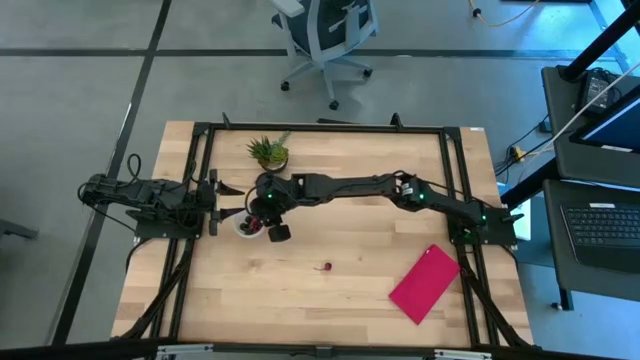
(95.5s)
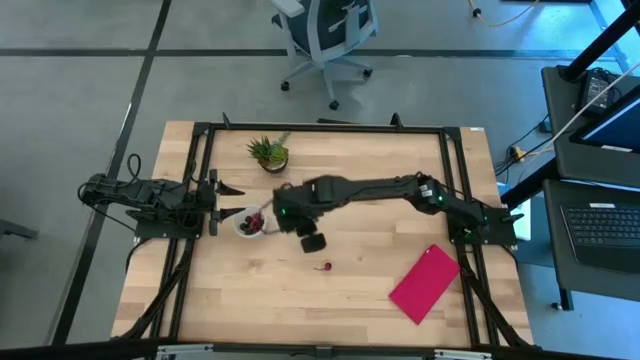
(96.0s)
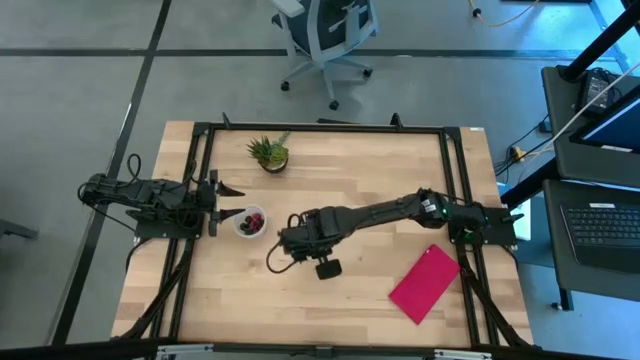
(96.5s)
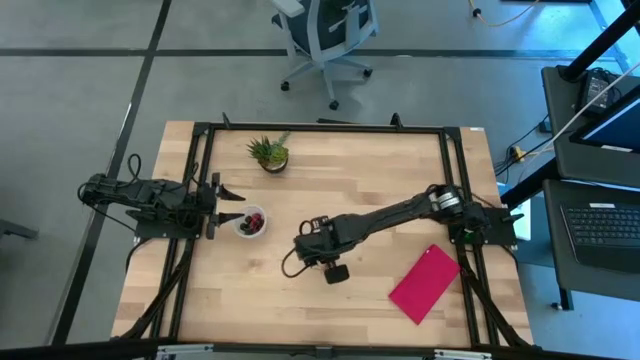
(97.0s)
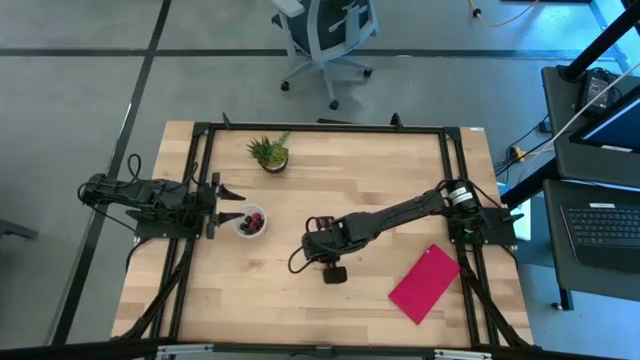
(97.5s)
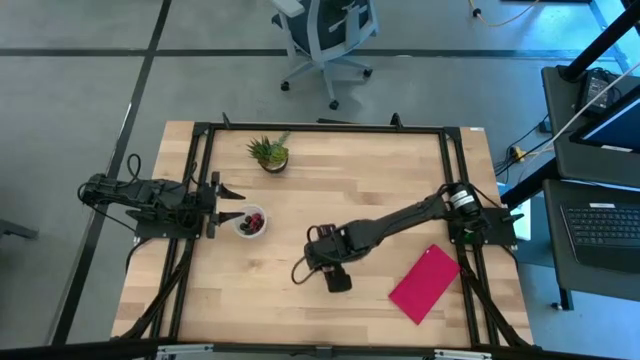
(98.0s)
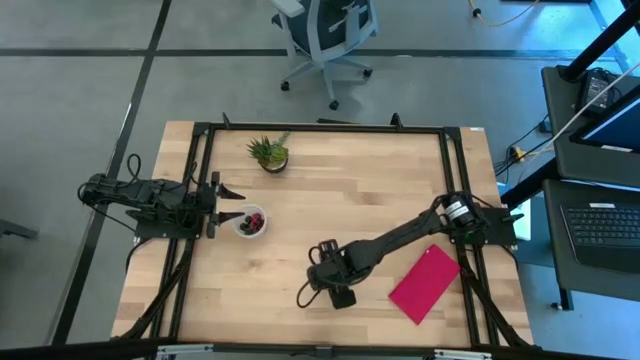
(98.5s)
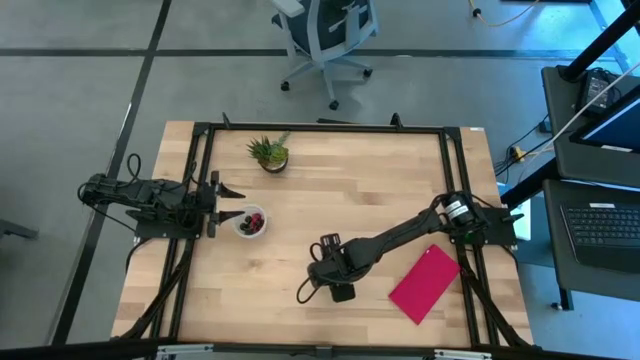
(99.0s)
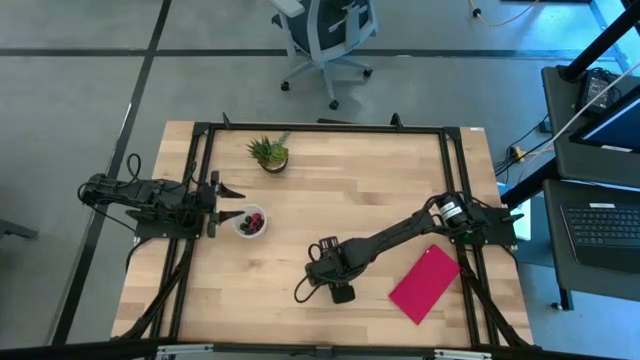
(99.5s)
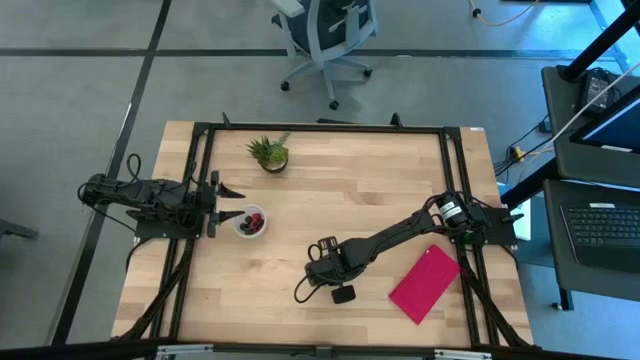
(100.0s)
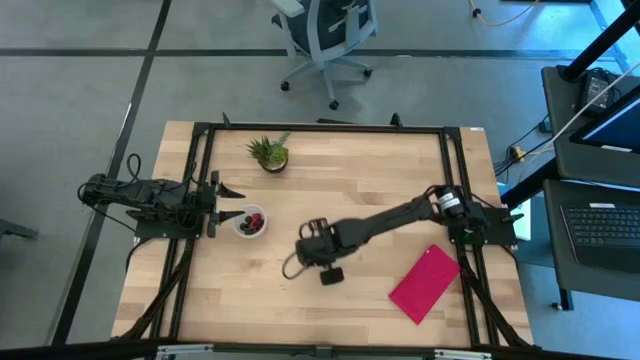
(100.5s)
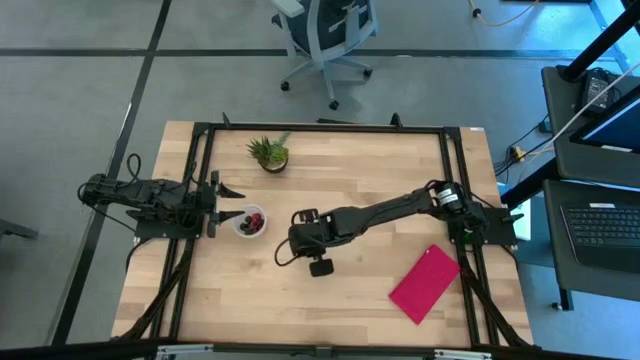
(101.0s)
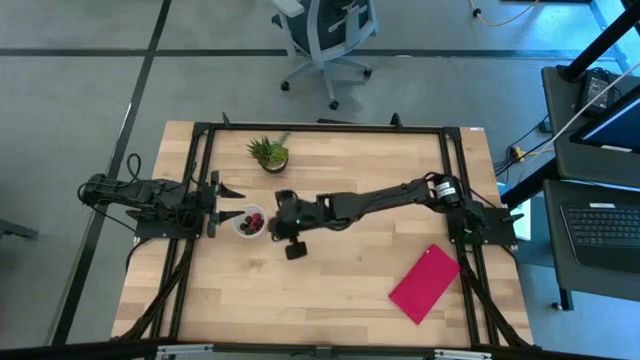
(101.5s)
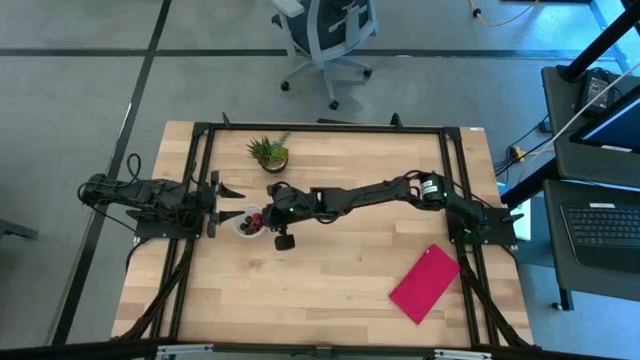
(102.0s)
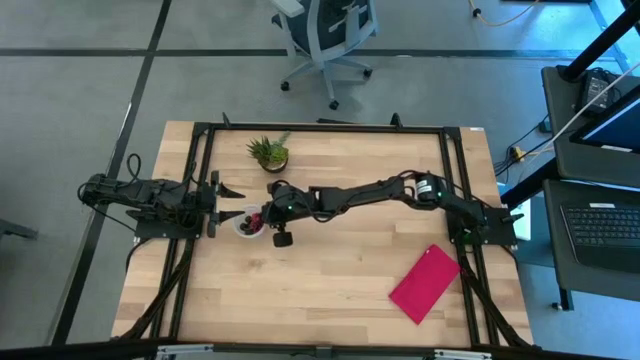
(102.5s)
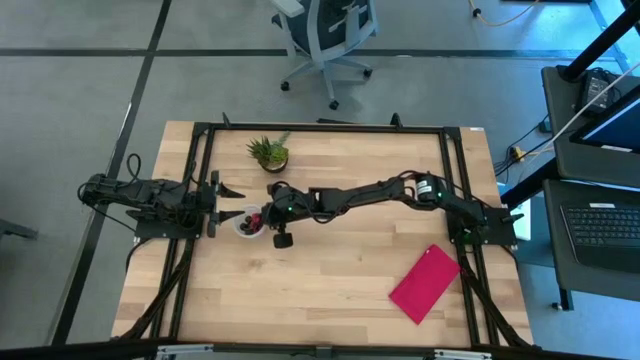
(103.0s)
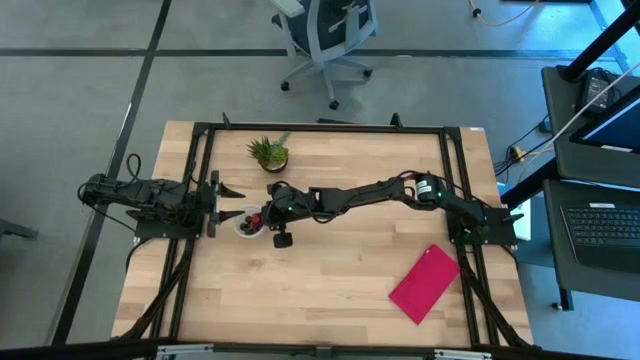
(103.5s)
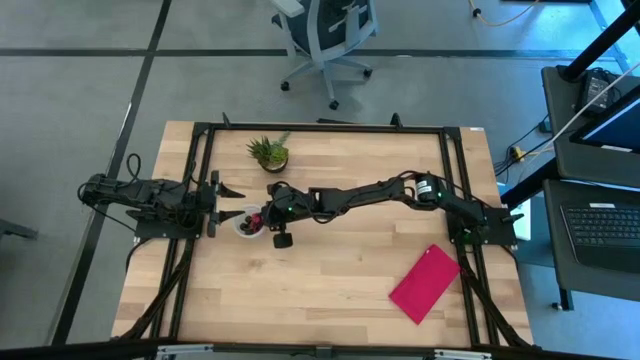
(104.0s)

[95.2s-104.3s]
Task: Pick and placing Produce into tupperware
Put the red cherry into the transparent container

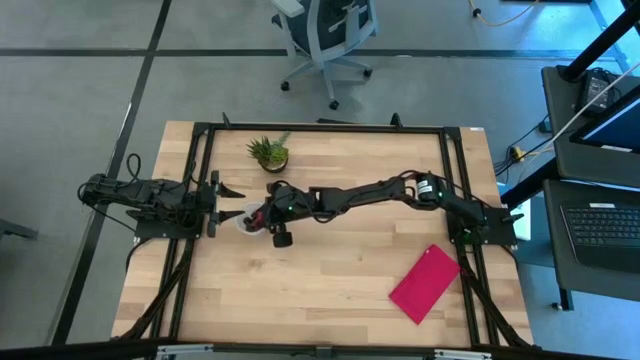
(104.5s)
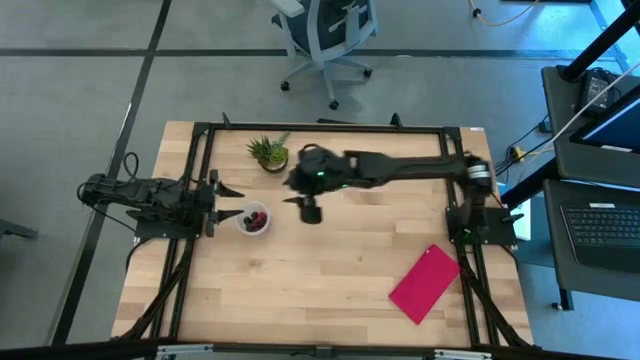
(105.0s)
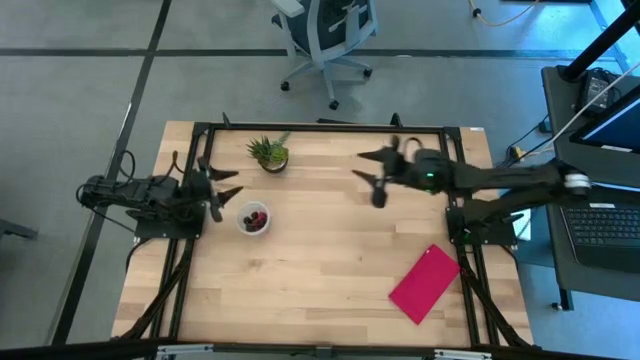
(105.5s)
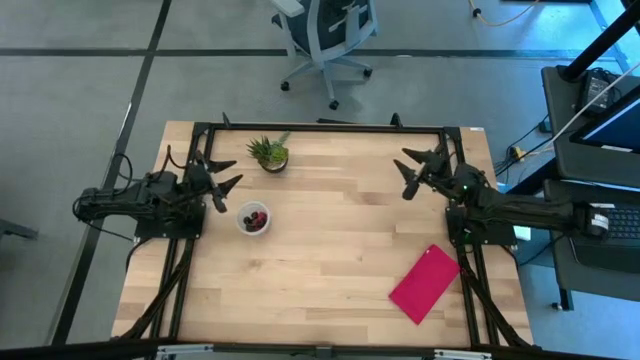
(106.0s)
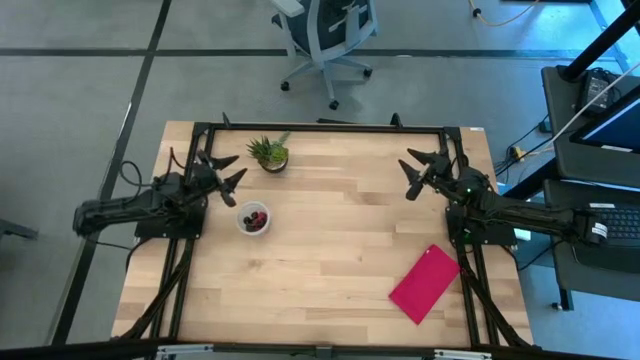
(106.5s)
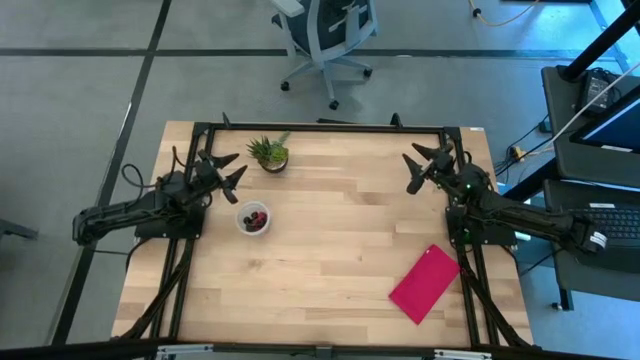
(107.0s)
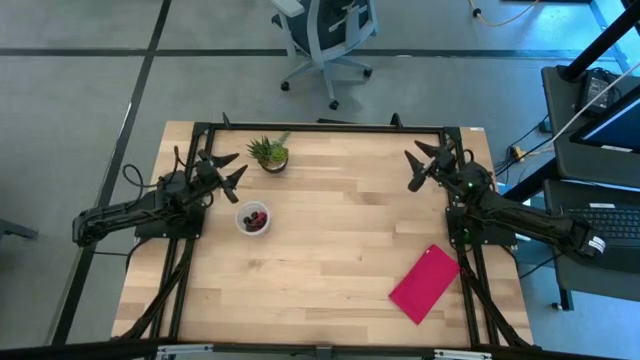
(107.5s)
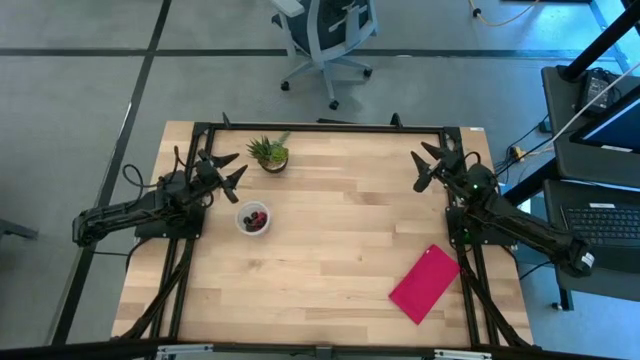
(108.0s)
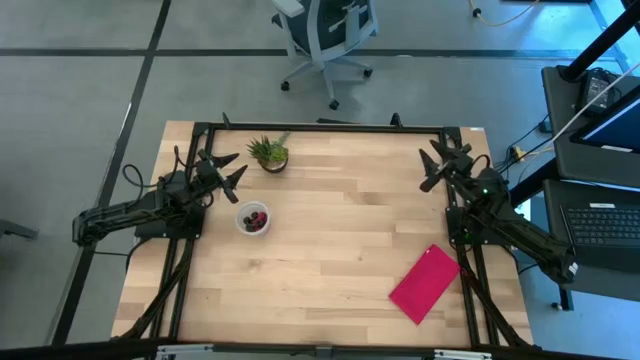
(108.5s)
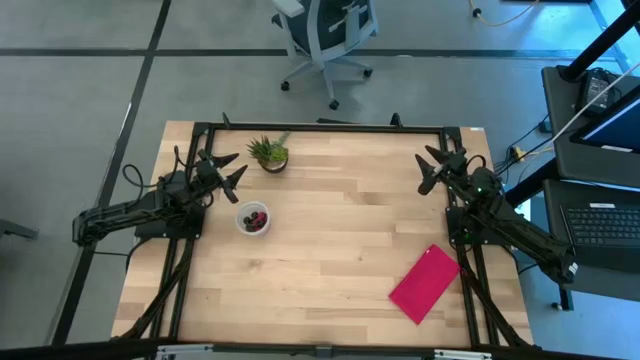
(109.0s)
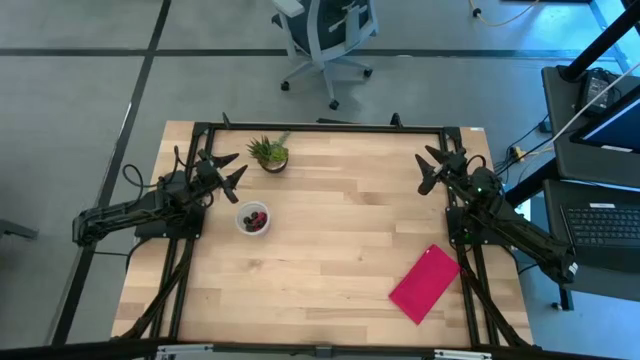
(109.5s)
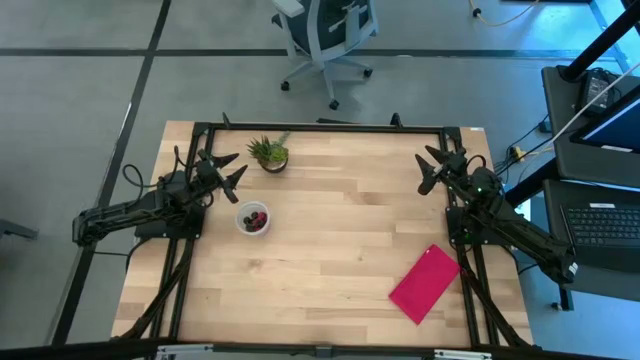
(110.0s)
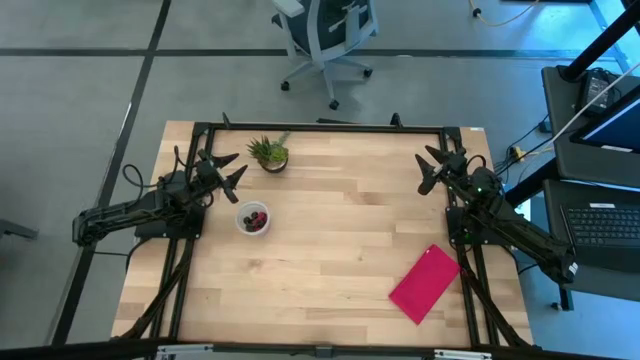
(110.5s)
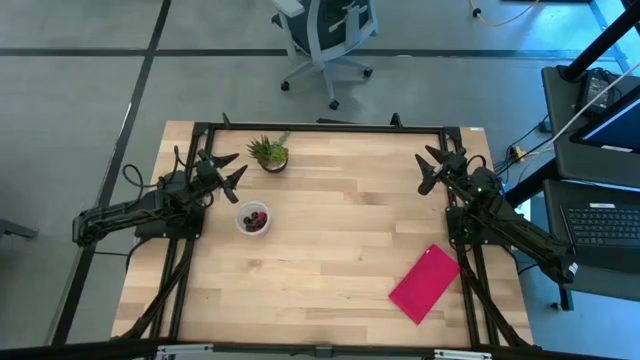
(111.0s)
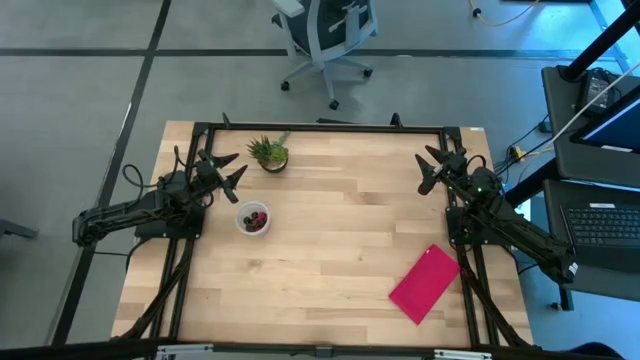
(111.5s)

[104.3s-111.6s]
Return to Home Position

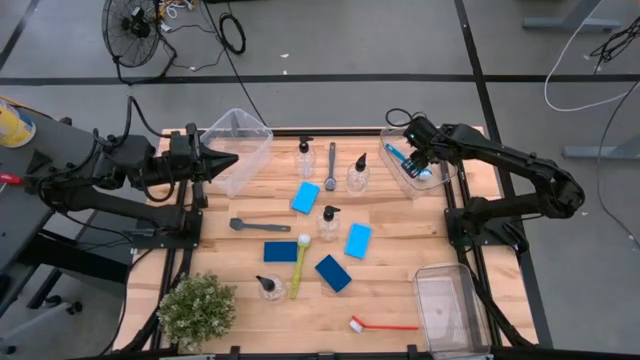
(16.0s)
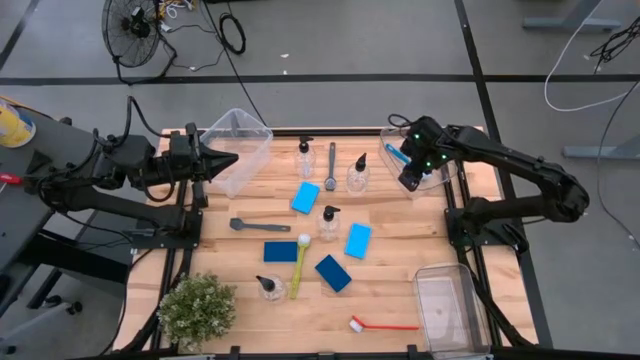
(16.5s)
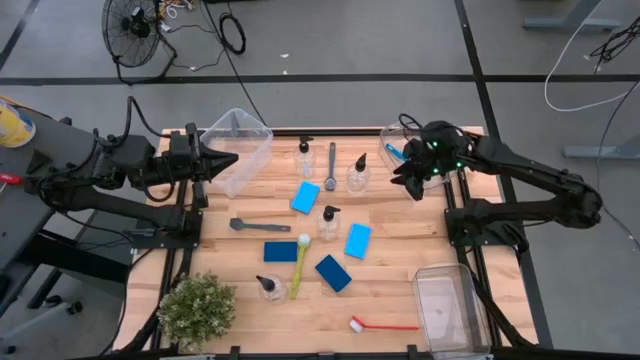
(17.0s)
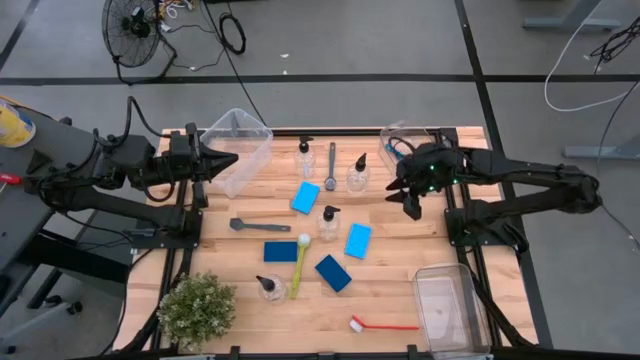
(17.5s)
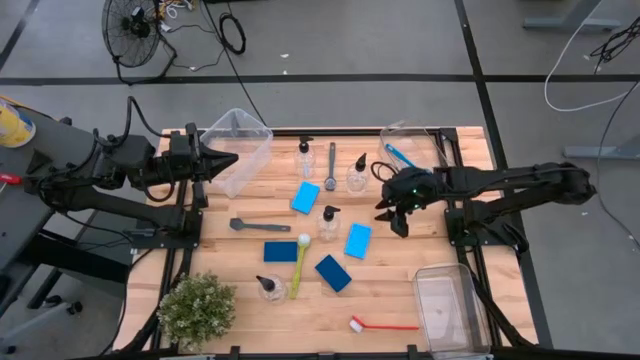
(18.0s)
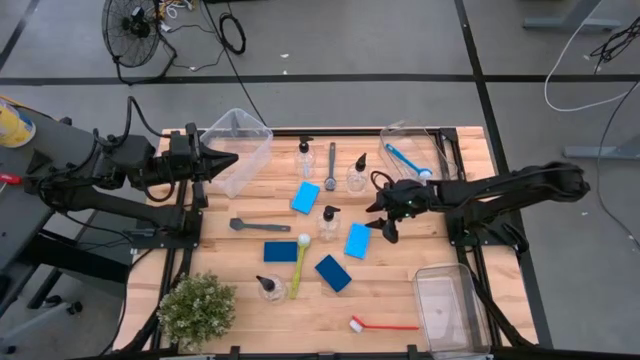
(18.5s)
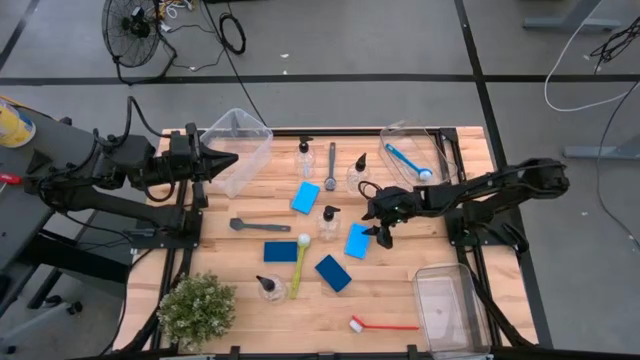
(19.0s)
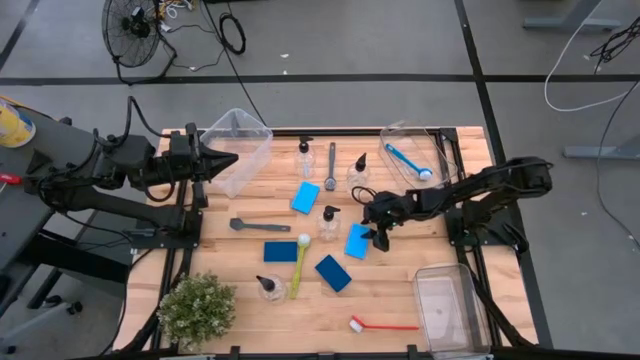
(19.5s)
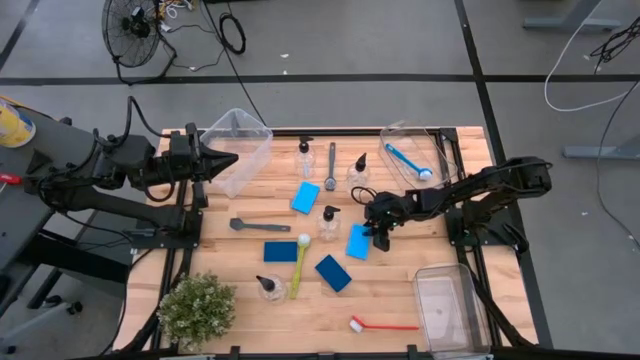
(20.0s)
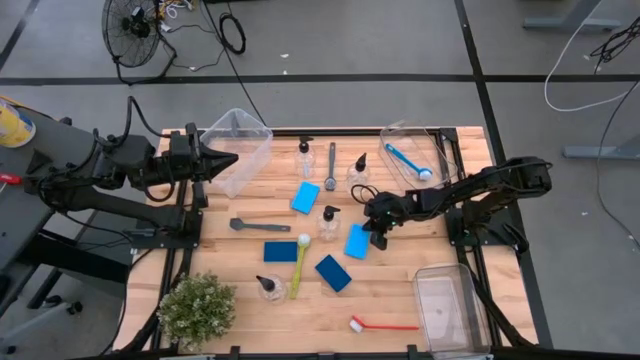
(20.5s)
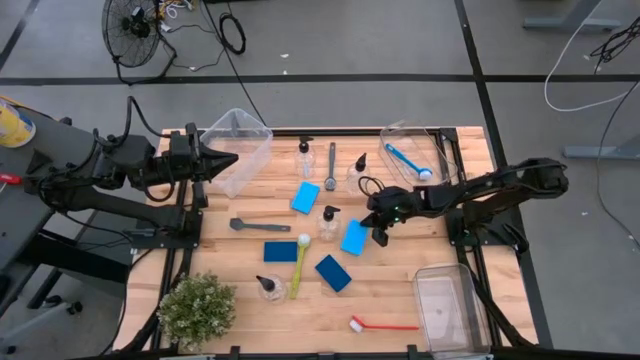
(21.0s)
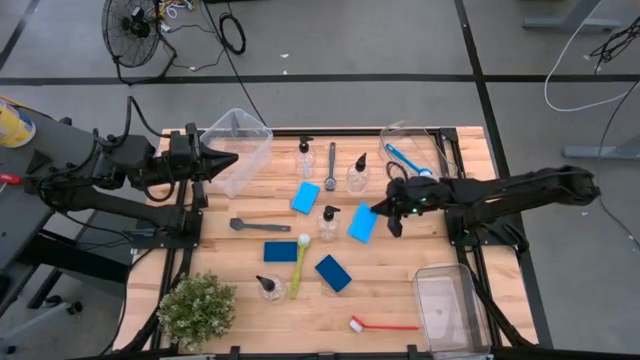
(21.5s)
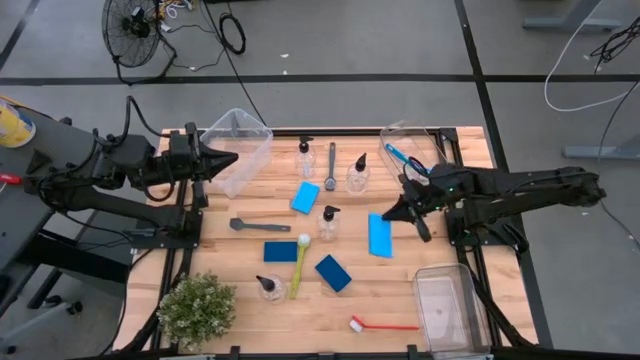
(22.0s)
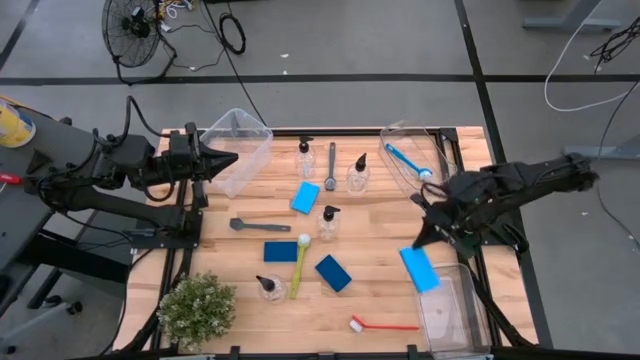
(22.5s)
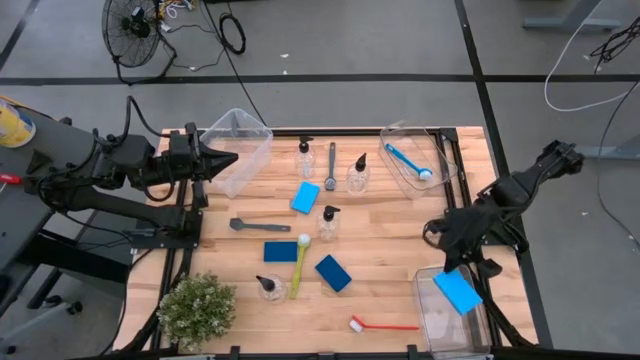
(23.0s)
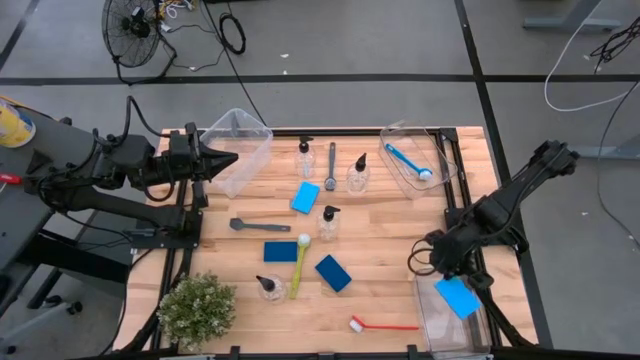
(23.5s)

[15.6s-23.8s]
Task: Pick & Place Kitchen Sink Supplies
Put the light blue sponge into the bottom transparent bin
